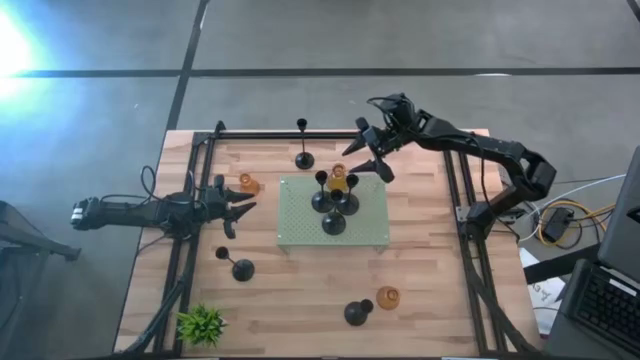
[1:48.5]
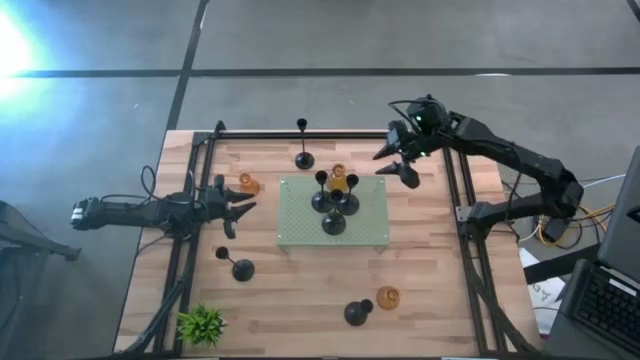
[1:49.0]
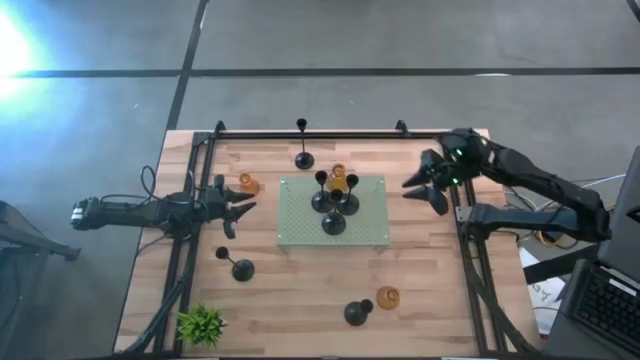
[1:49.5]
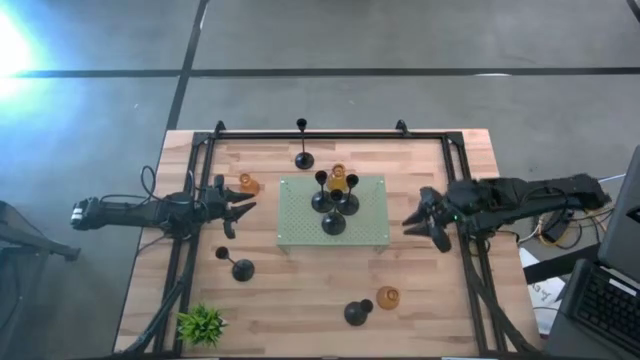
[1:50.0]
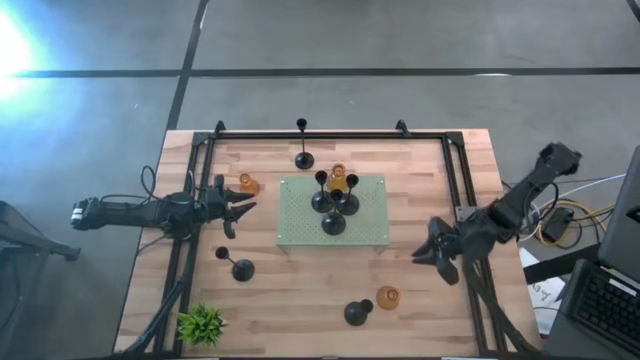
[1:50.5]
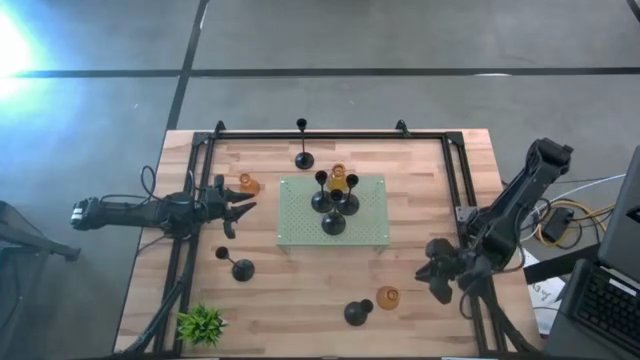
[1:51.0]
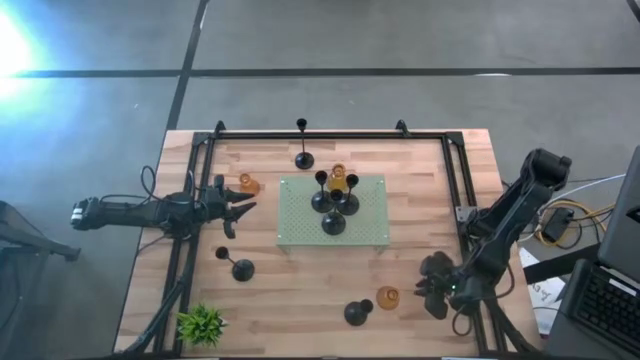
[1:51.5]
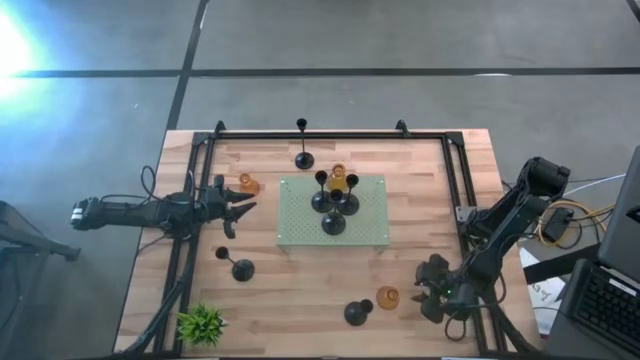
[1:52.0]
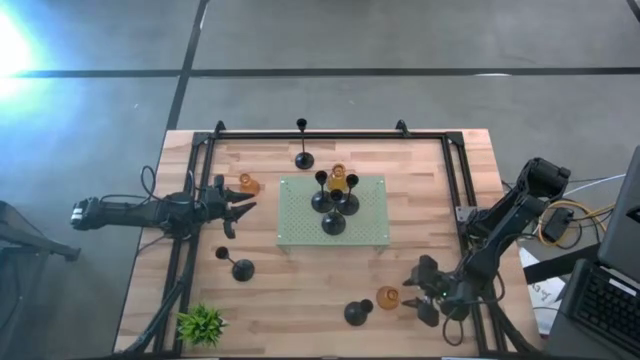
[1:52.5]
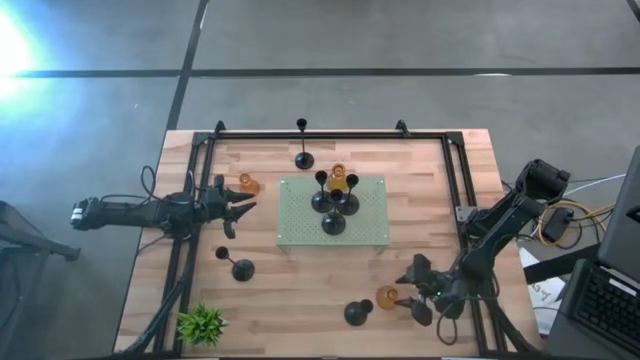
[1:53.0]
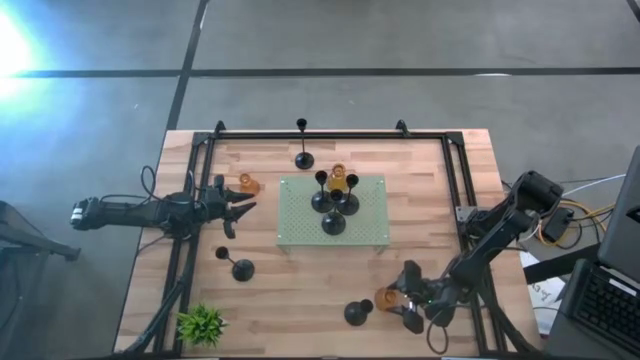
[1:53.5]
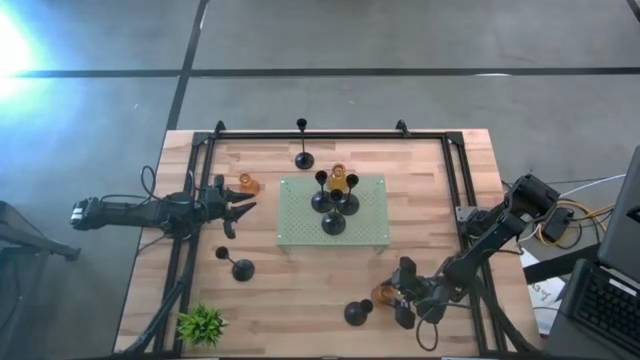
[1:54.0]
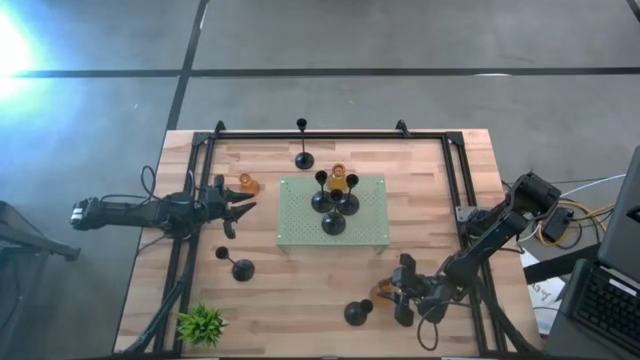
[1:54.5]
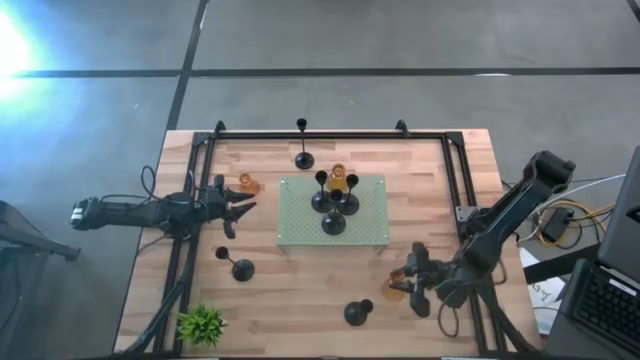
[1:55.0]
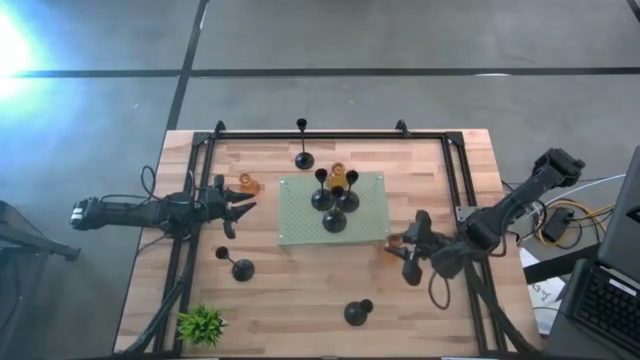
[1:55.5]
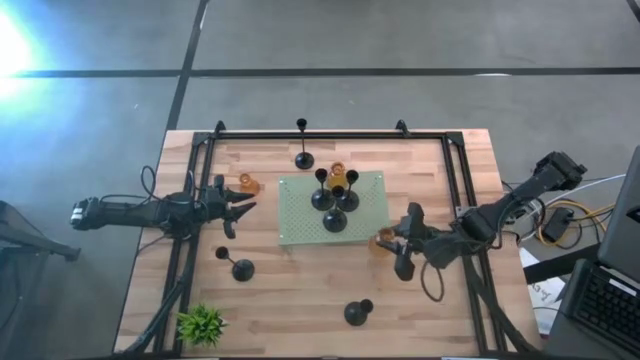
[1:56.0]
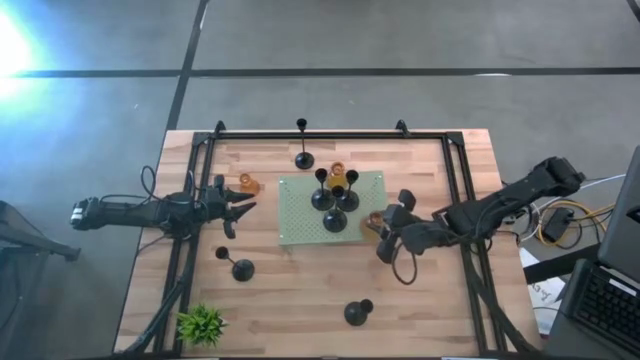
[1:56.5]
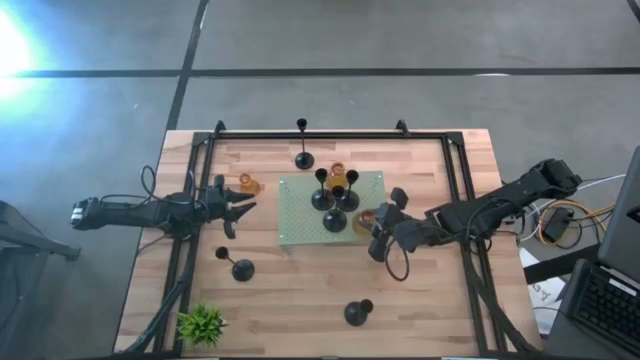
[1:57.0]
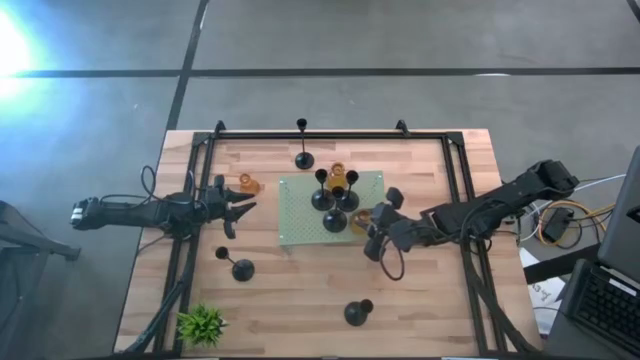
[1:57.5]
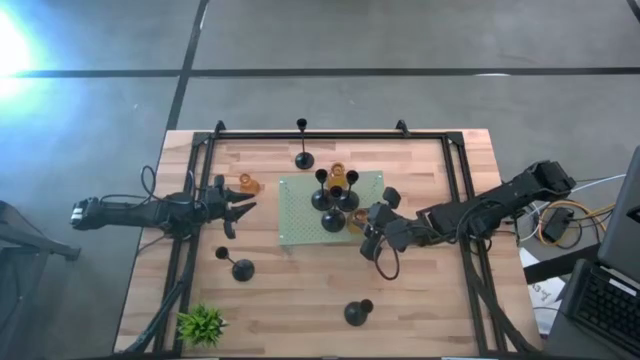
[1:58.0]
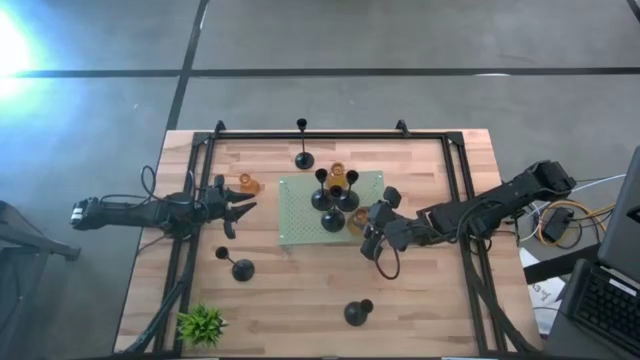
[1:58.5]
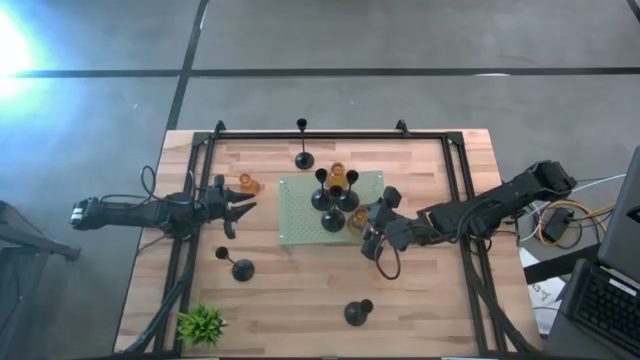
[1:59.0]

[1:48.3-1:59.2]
Task: Pick & Place candle stick holders
Put the yellow glass on the shelf

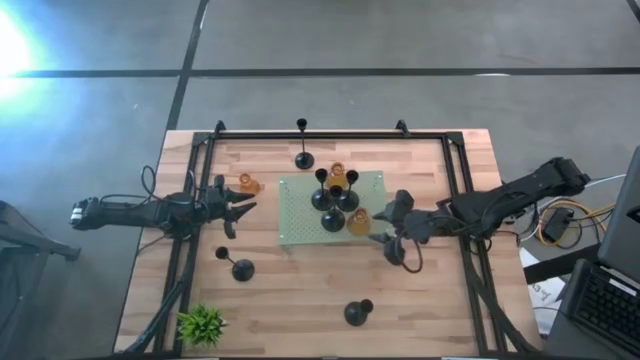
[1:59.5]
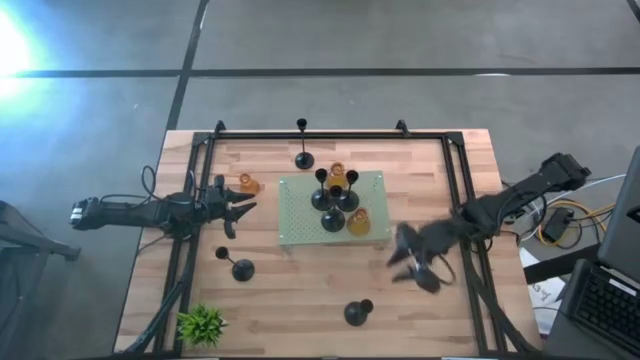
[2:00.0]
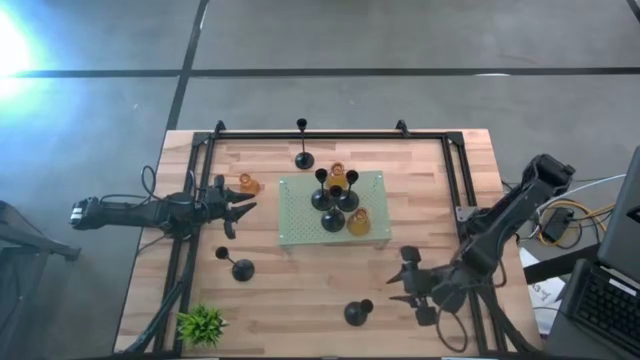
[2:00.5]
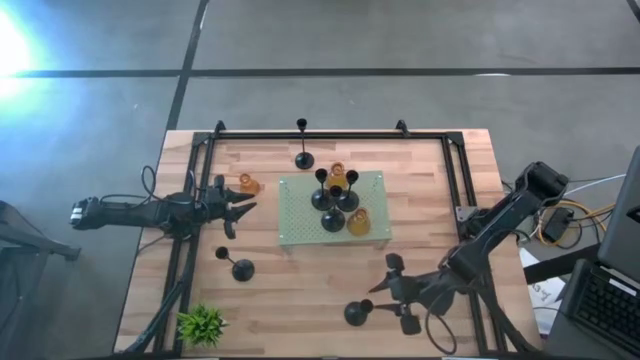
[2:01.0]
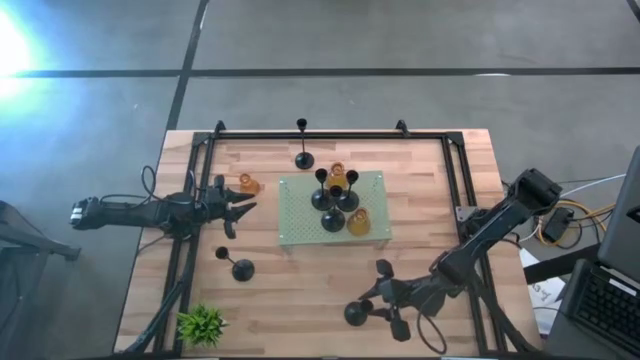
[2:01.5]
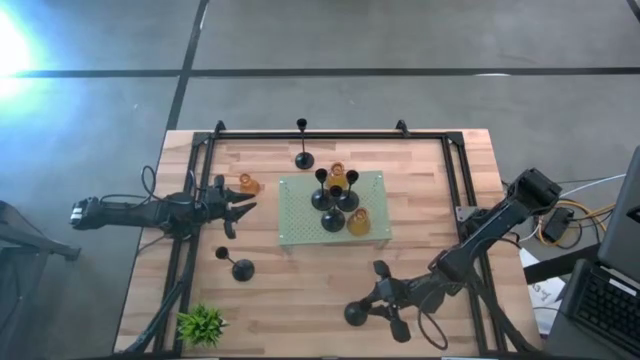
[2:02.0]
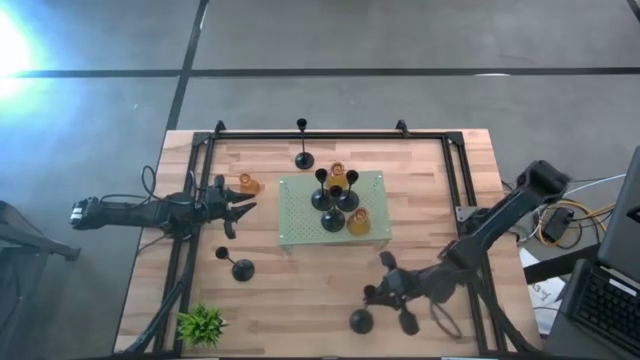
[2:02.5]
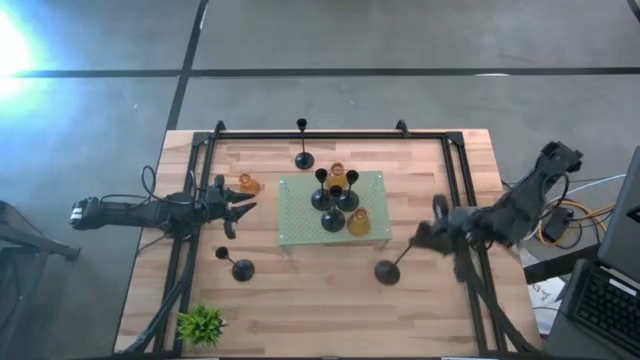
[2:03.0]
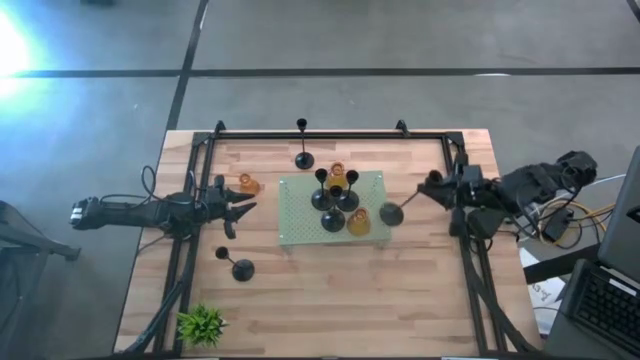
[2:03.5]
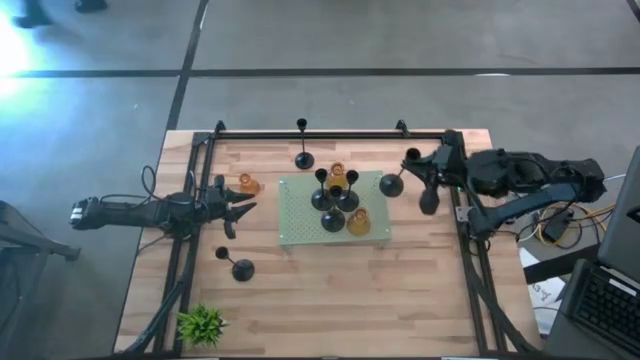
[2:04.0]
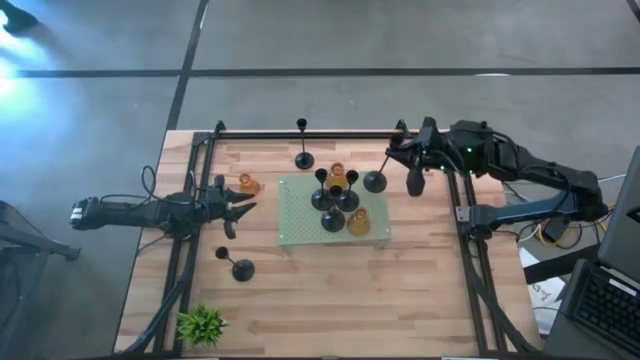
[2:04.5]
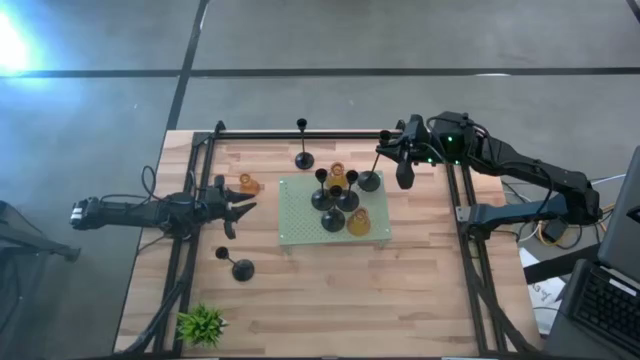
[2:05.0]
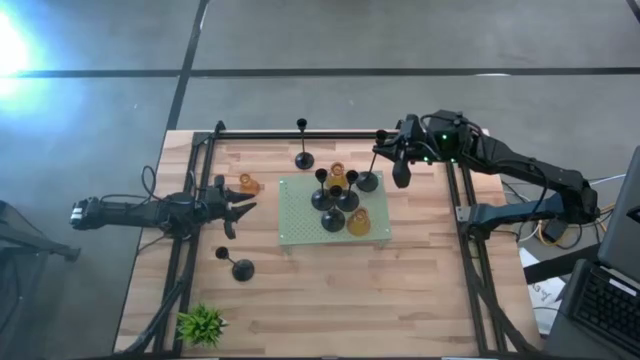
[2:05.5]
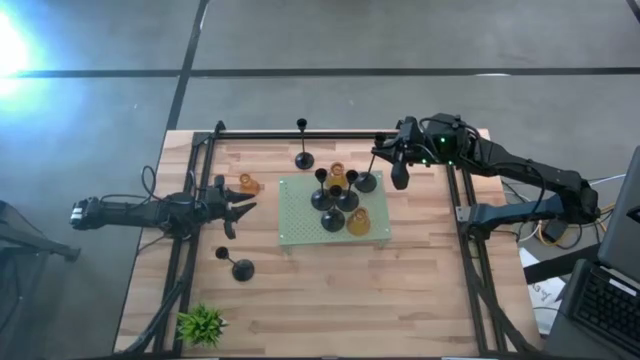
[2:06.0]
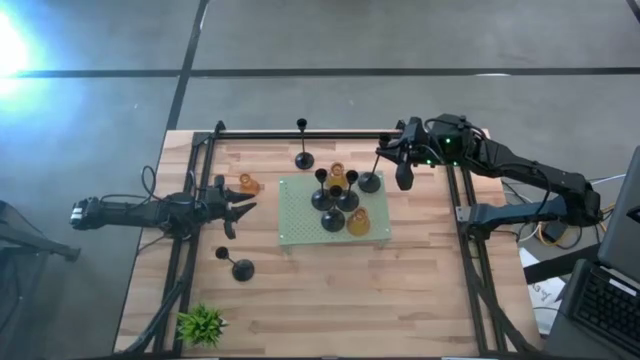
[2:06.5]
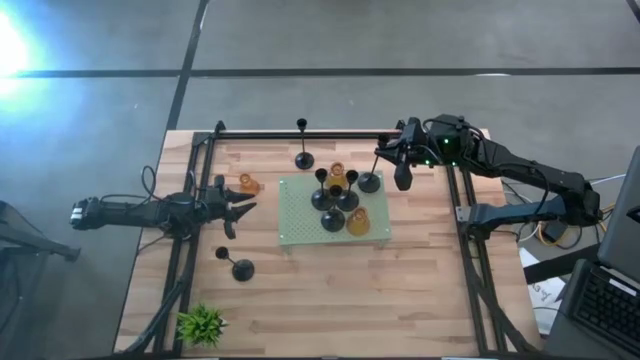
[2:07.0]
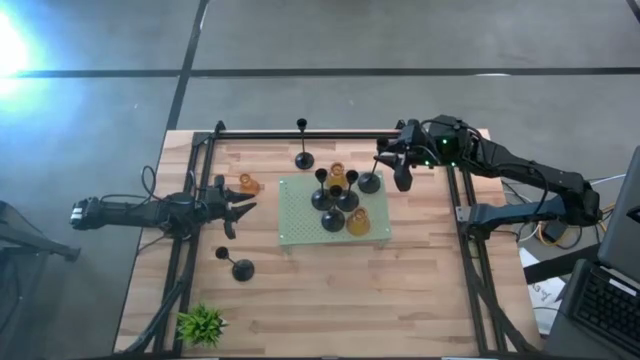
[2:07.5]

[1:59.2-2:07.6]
Put the black candle holder on the shelf

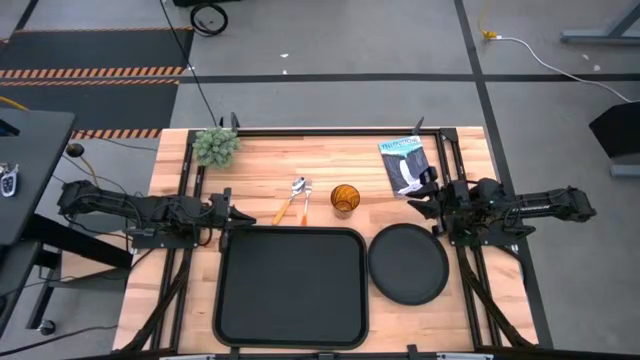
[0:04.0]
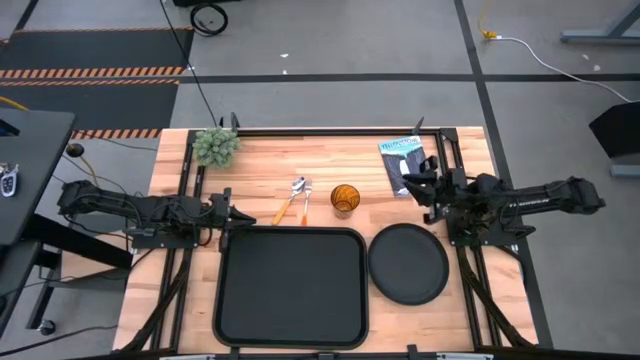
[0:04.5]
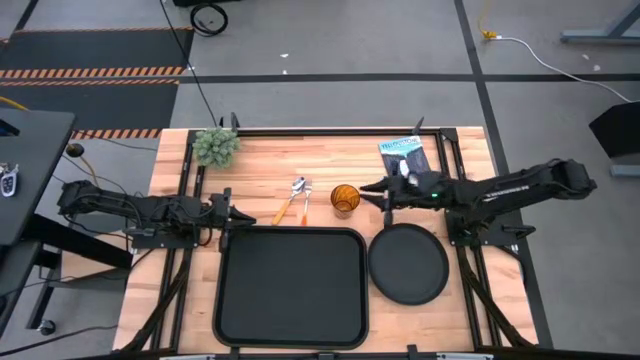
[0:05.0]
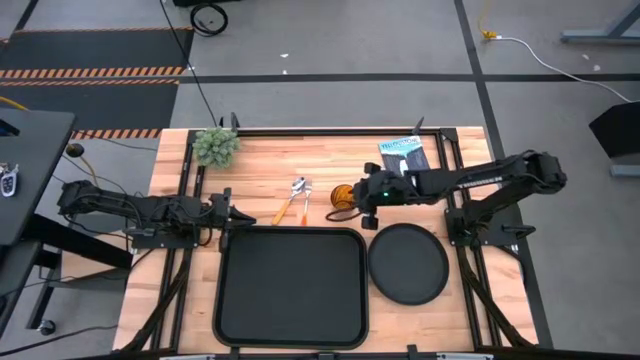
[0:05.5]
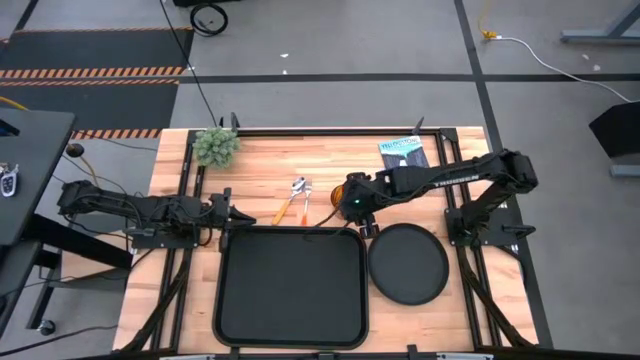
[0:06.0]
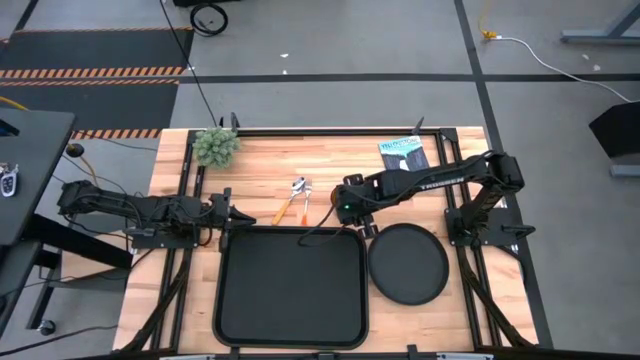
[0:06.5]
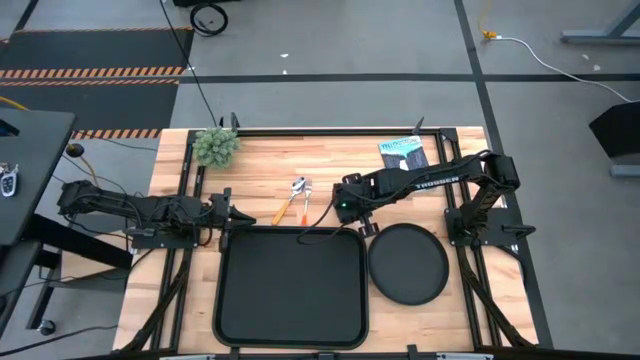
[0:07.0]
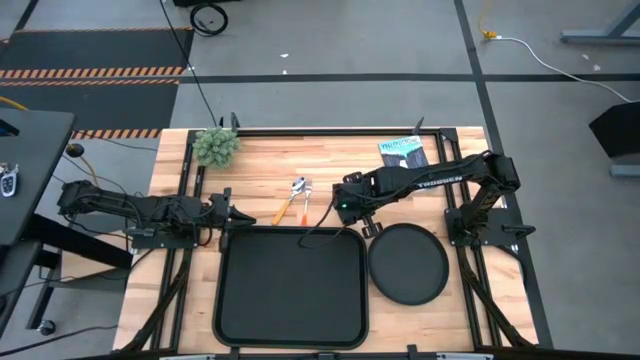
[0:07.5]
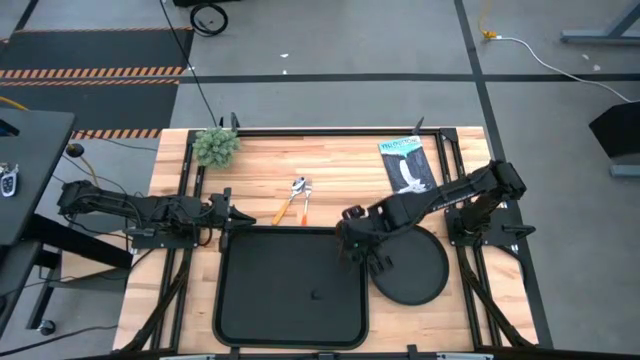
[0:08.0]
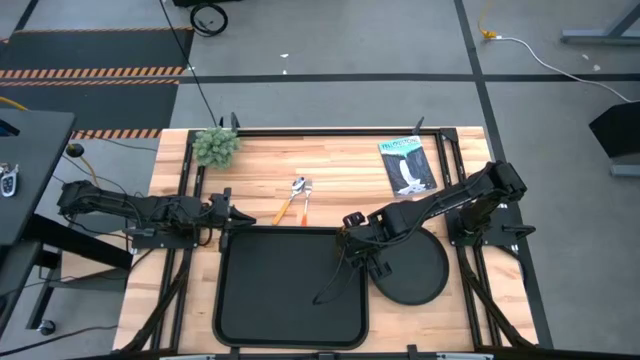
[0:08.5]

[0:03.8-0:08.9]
Task: Pick and place plate/cup/fork/spoon on tray
Put the orange cup on the black tray
